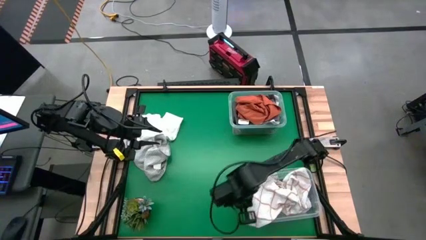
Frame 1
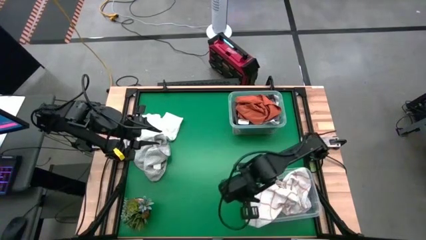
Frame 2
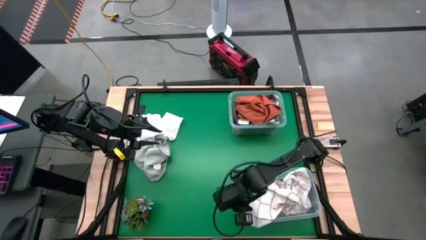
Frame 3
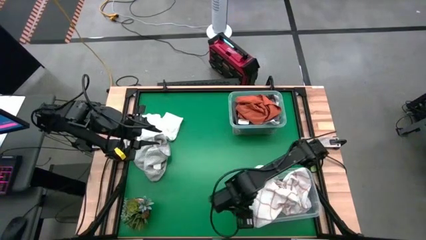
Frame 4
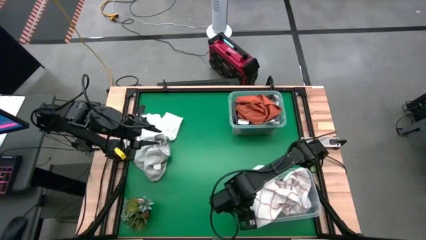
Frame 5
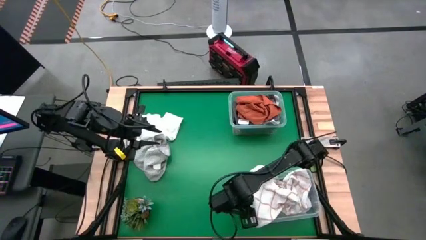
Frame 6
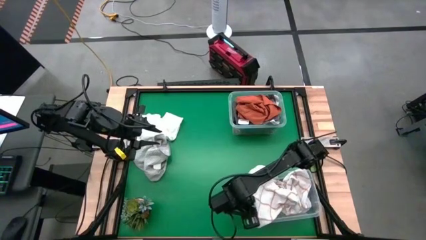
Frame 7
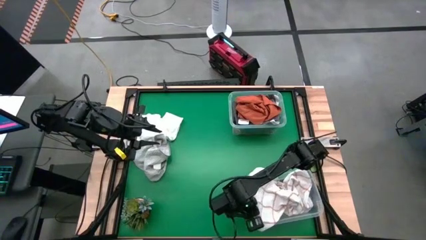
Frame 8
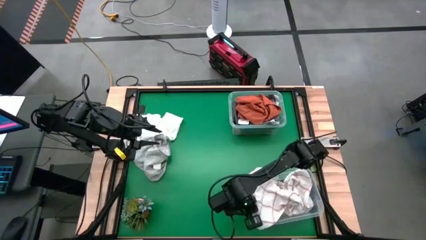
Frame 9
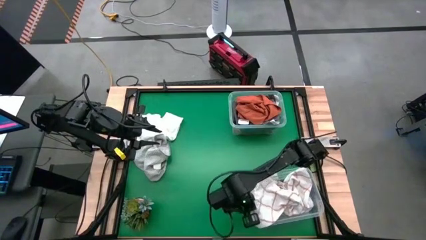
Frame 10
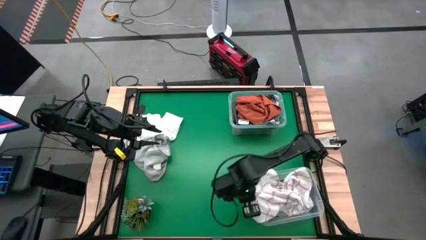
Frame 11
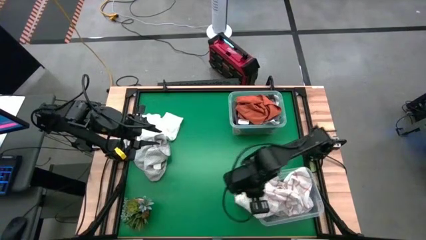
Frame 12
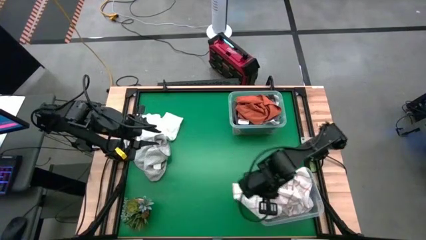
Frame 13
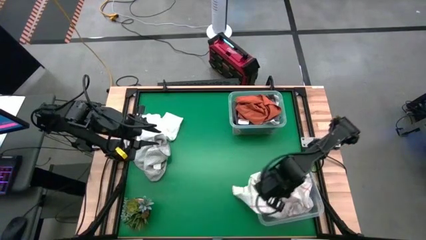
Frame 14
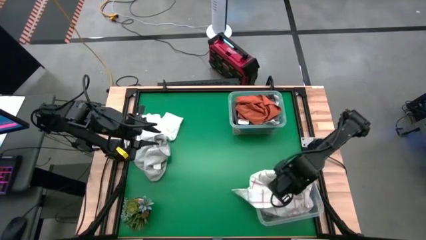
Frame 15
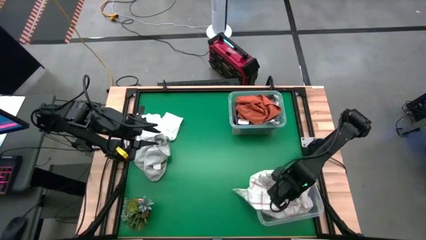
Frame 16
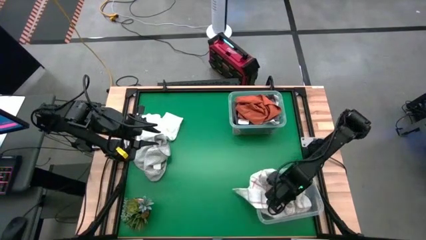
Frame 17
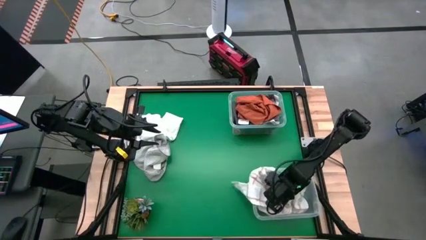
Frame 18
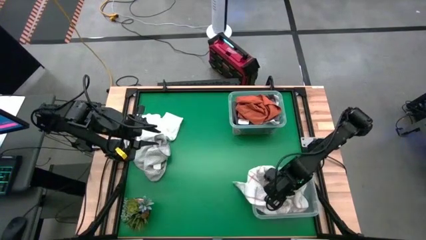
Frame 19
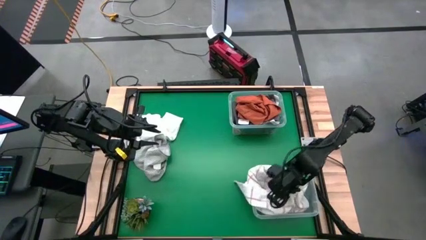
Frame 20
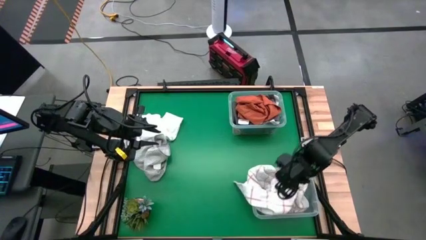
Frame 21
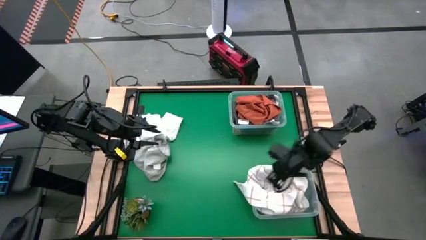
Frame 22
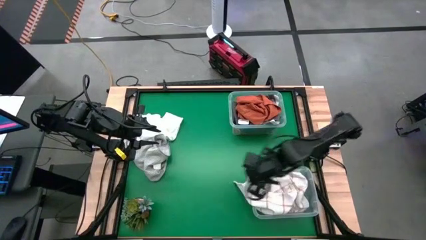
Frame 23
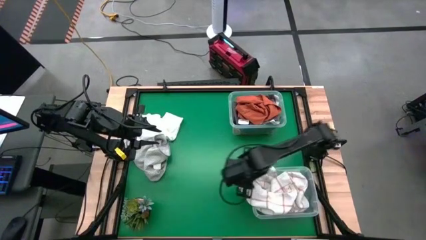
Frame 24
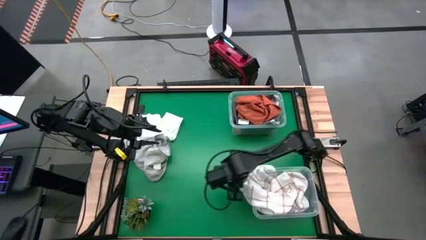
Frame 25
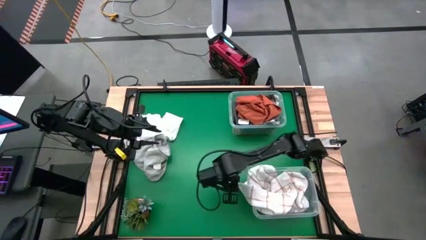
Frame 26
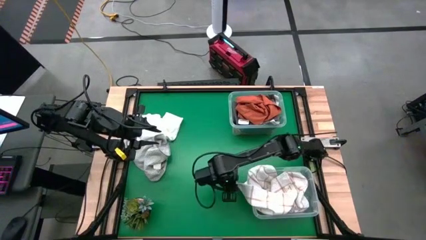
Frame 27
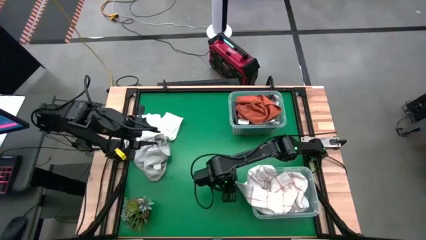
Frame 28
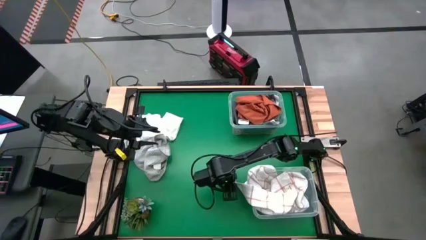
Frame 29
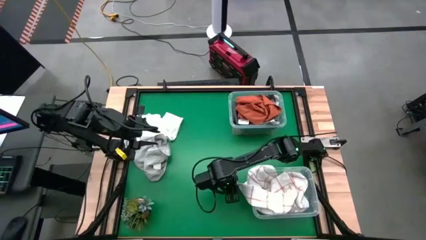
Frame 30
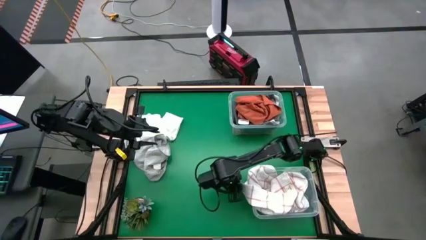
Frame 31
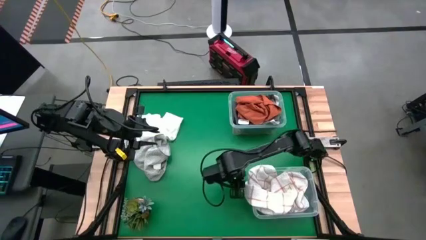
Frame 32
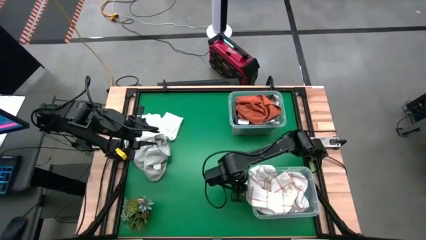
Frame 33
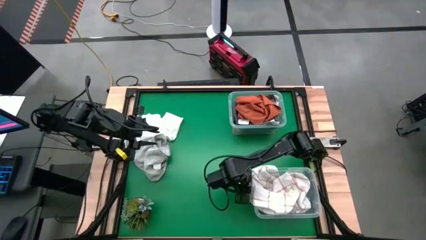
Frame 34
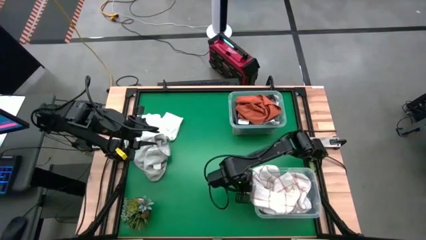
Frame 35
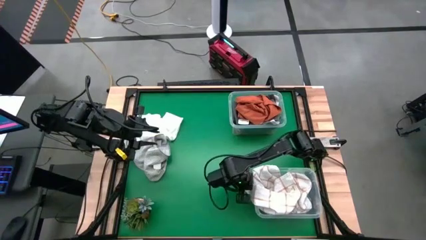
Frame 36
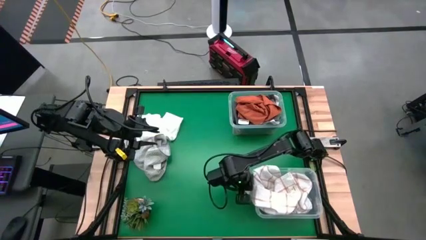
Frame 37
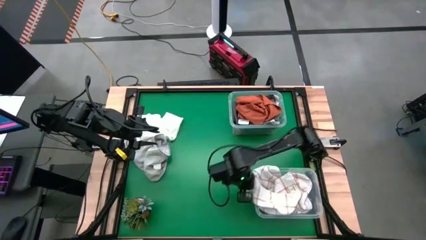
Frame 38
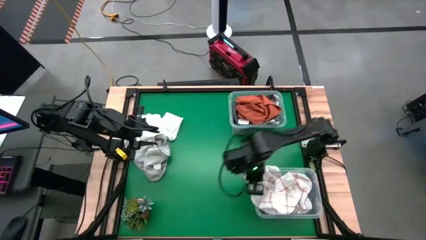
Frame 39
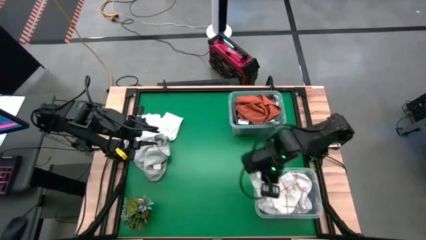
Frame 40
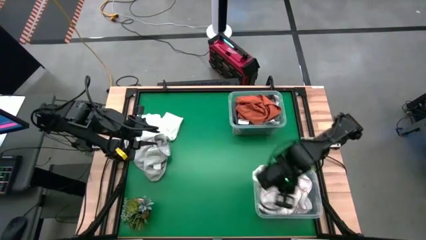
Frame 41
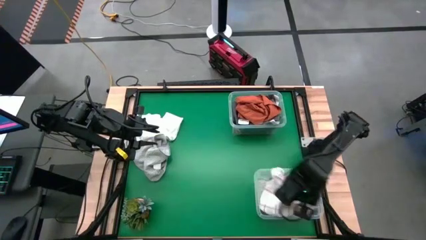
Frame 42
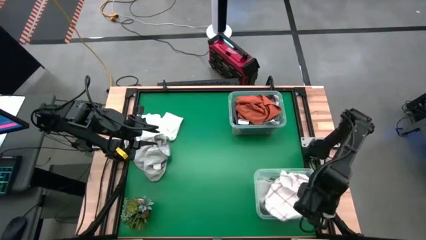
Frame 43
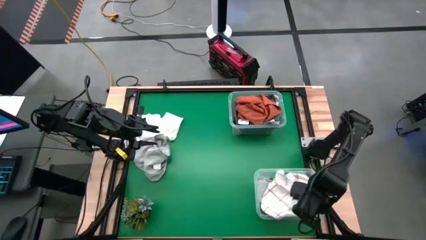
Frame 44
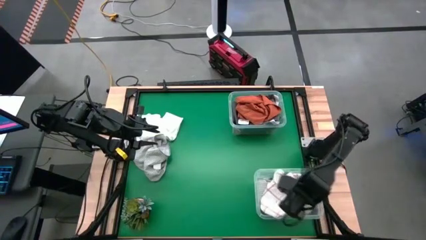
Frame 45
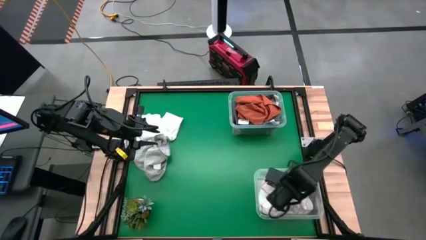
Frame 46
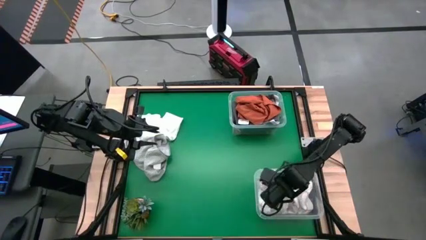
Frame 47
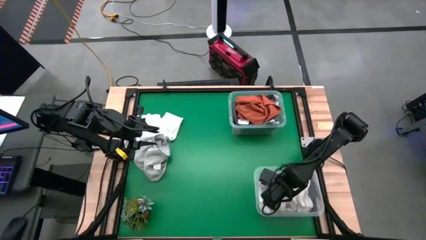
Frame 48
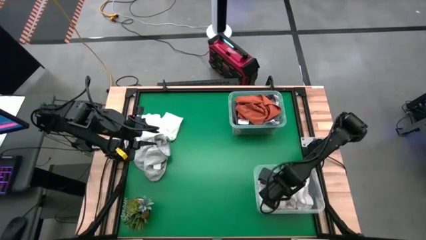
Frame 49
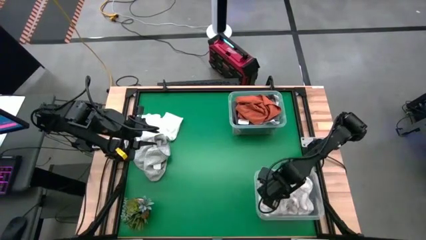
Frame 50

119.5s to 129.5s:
Task: Sort towels by color in basket
Put the white squared towel into the bottom transparent bin
